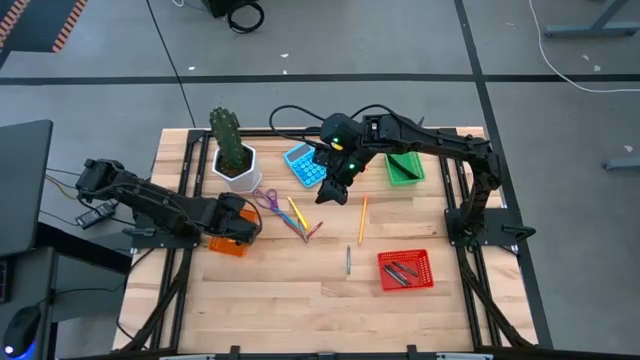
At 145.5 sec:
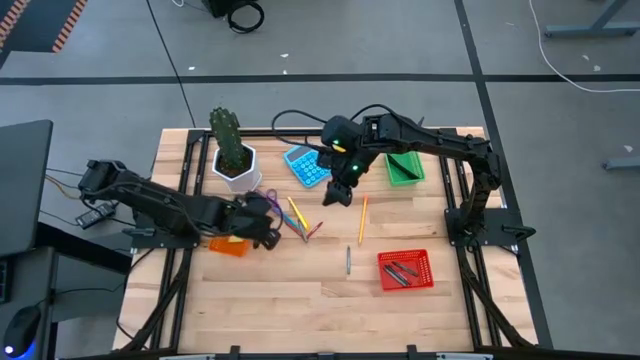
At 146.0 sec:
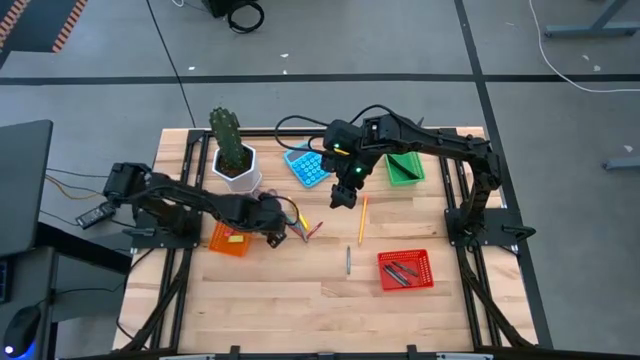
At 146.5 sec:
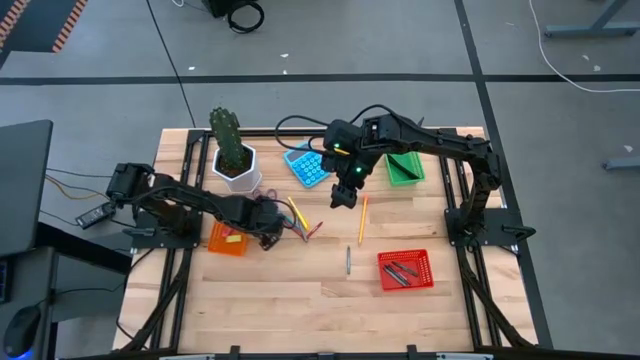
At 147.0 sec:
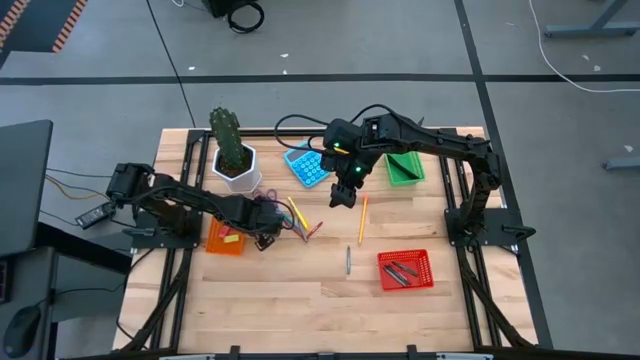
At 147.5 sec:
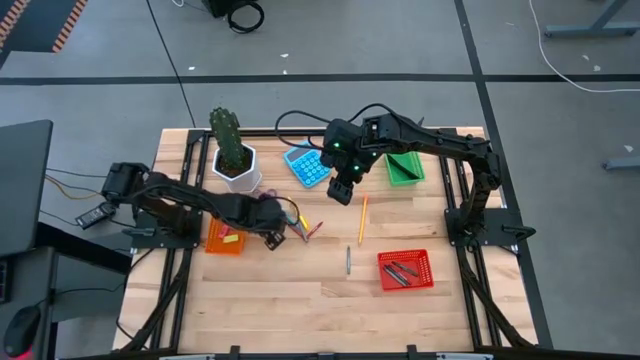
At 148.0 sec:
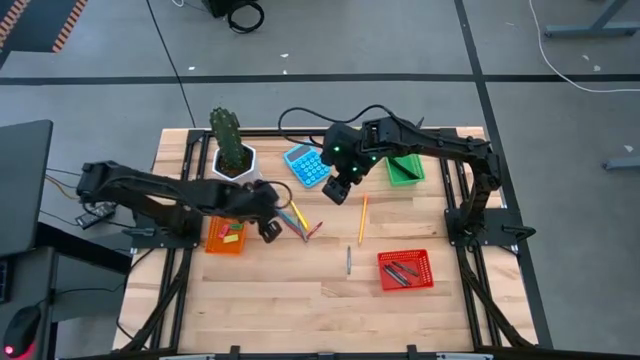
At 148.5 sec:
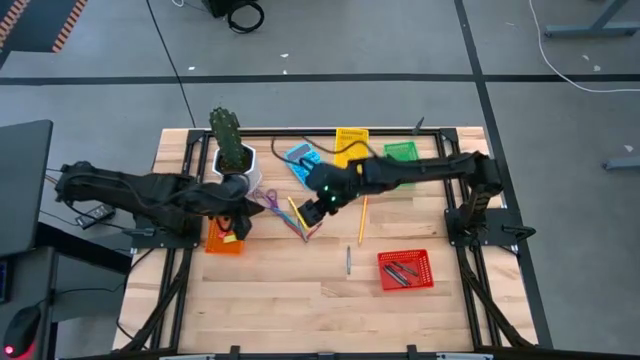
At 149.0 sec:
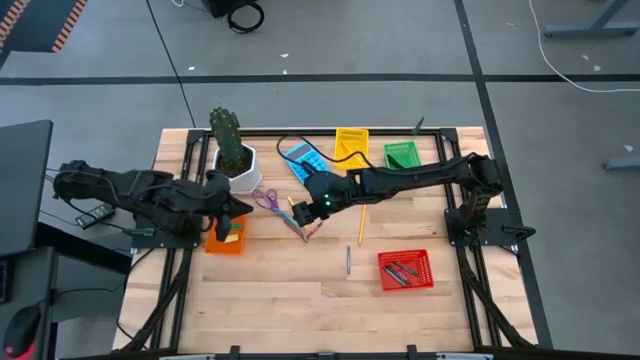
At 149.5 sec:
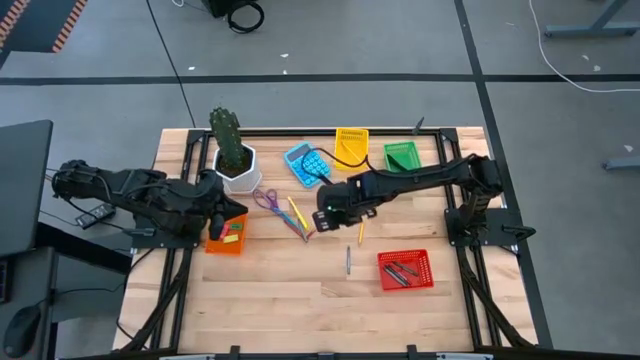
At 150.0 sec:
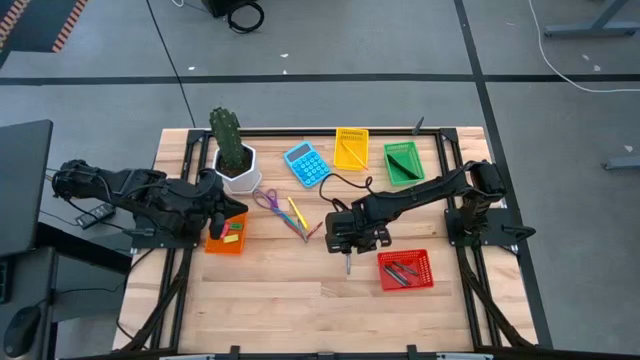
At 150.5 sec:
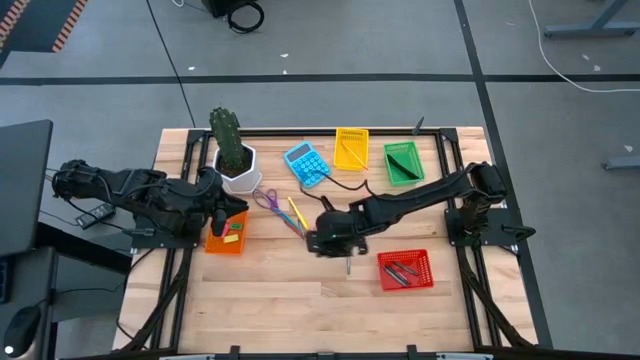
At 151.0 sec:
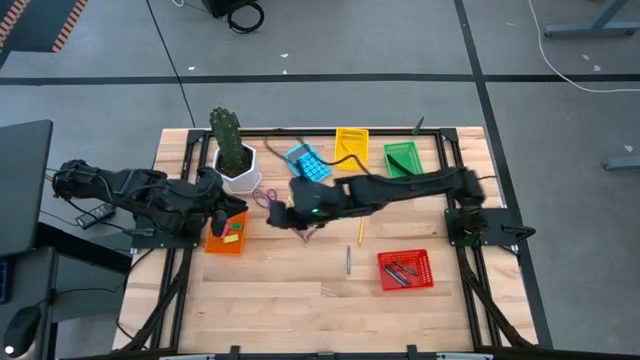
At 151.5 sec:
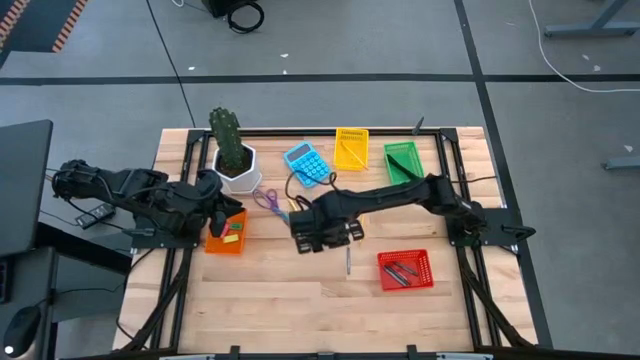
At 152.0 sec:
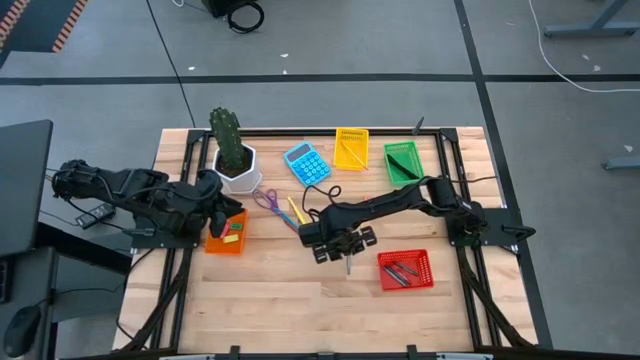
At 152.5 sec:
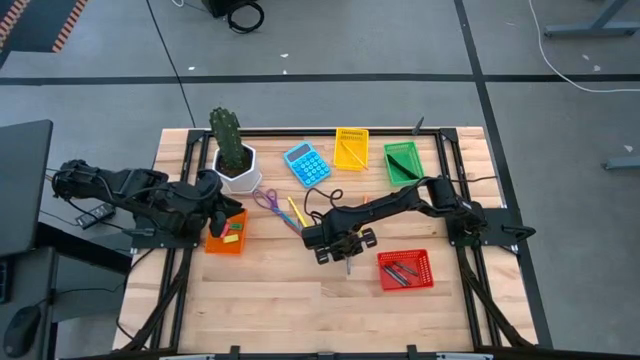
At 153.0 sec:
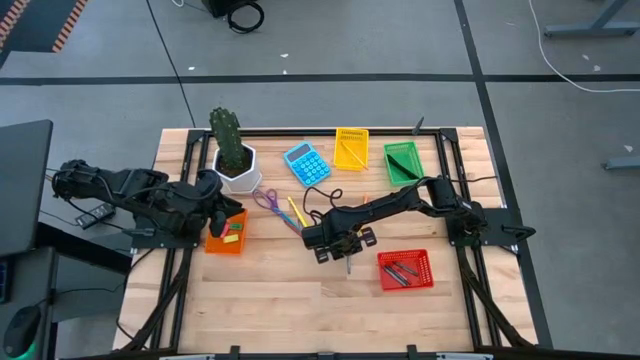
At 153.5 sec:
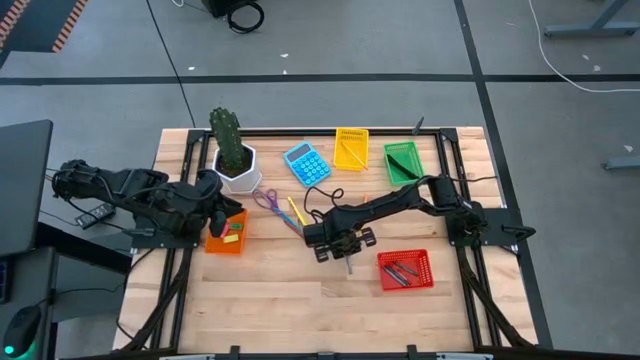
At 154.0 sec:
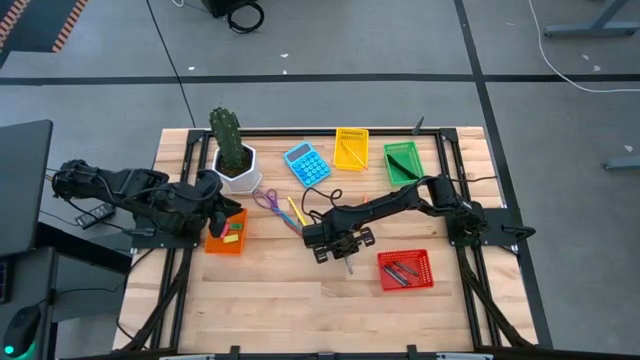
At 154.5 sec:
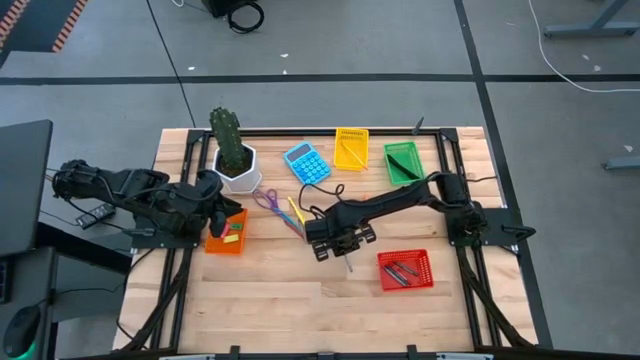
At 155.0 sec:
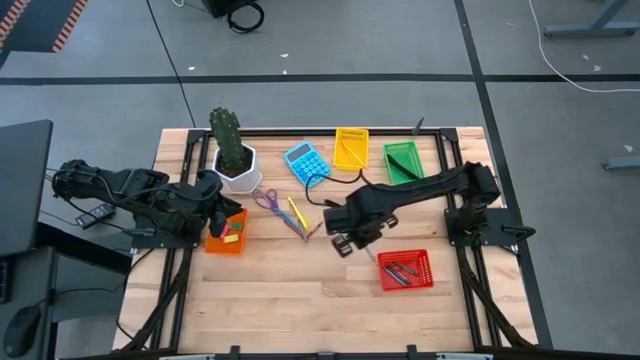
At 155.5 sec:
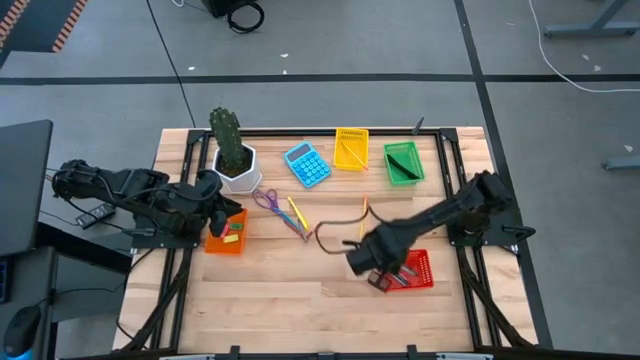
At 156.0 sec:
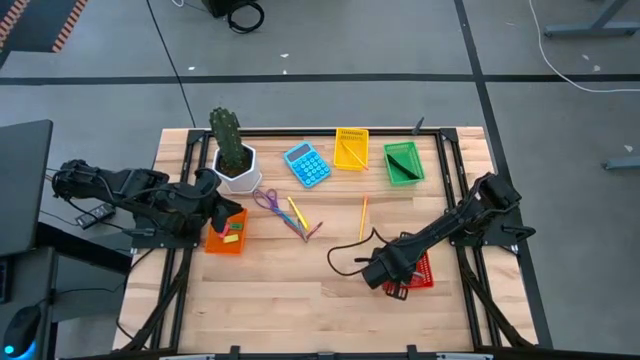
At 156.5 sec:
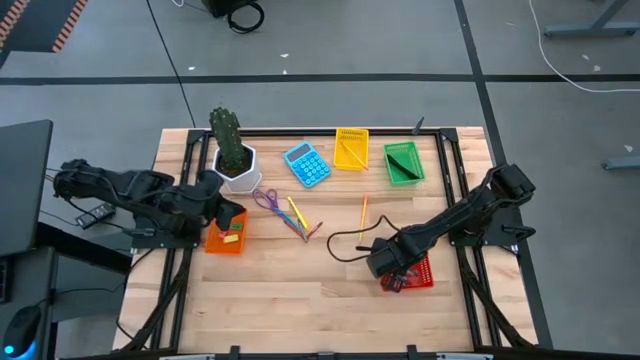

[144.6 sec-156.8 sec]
Task: Sort crayons/erasers/pens/pencils in bins
Put the bottom gray crayon into the red bin

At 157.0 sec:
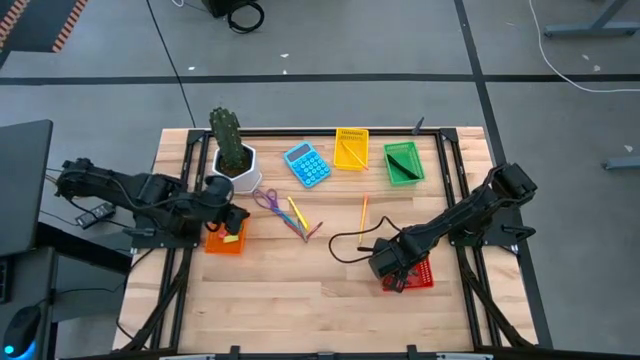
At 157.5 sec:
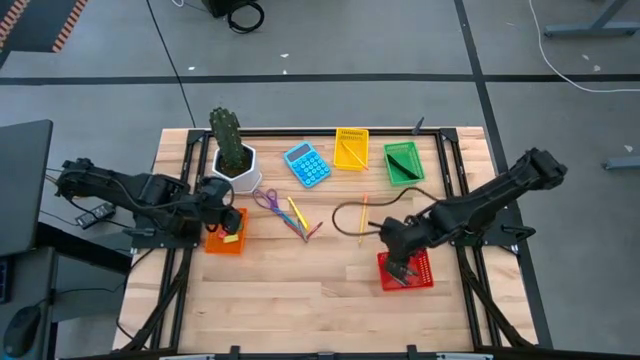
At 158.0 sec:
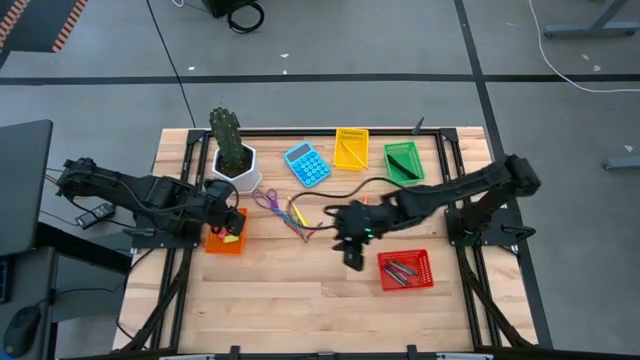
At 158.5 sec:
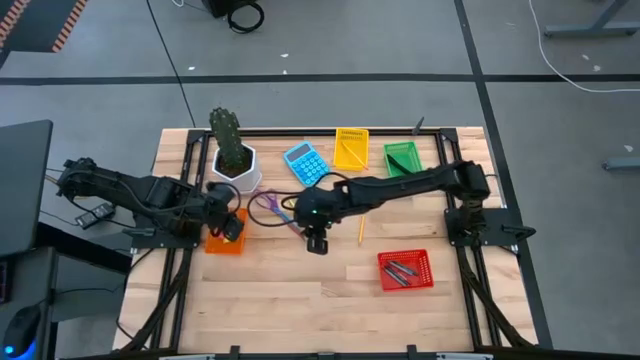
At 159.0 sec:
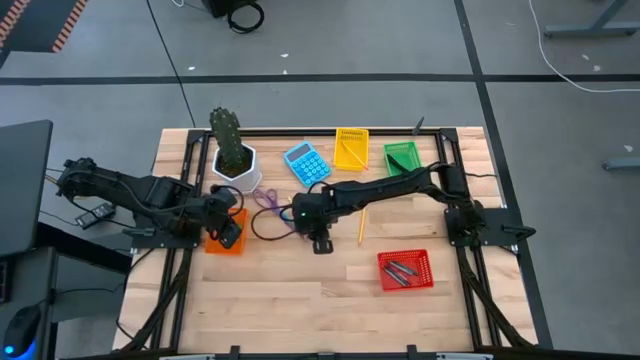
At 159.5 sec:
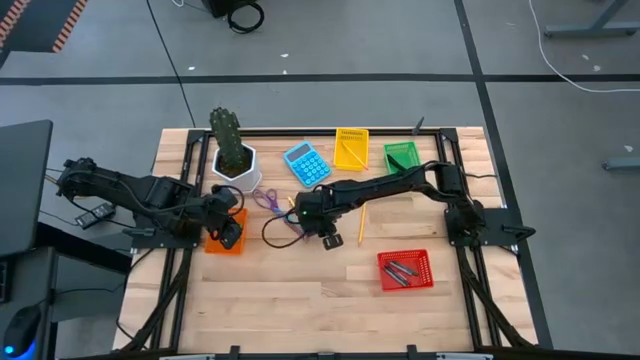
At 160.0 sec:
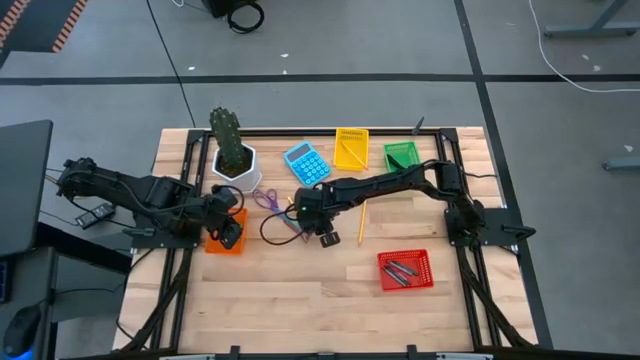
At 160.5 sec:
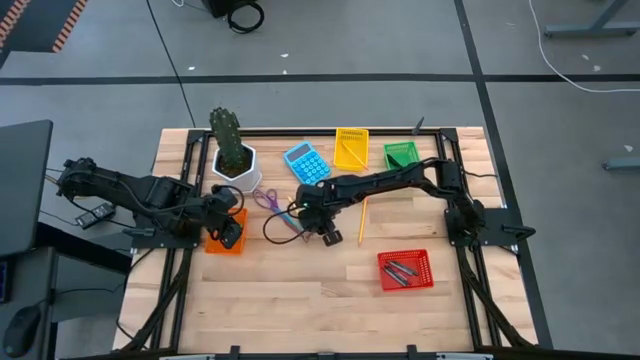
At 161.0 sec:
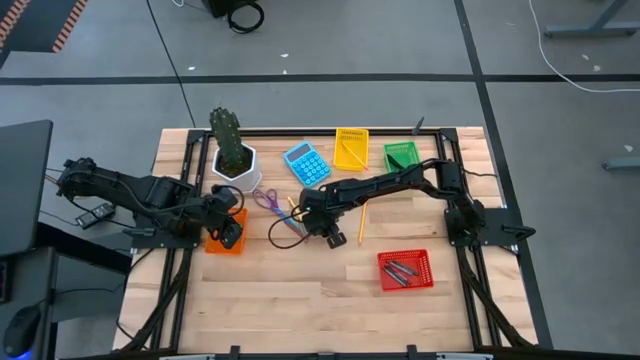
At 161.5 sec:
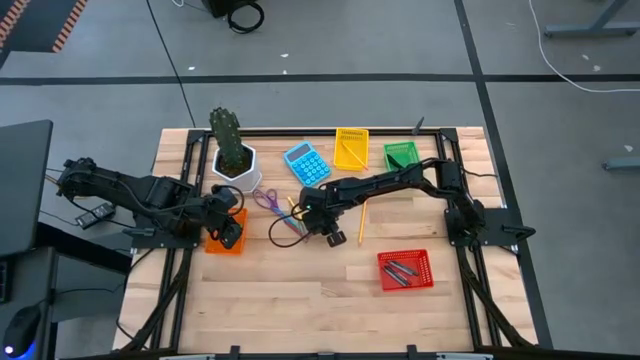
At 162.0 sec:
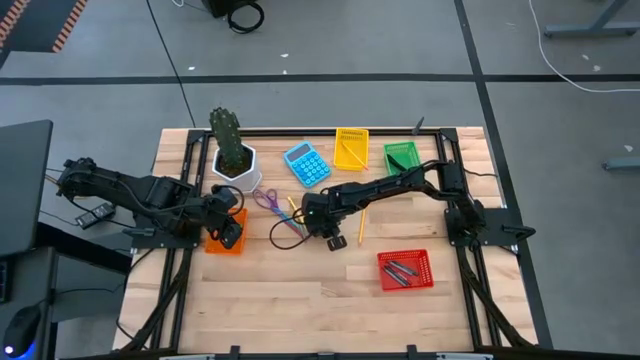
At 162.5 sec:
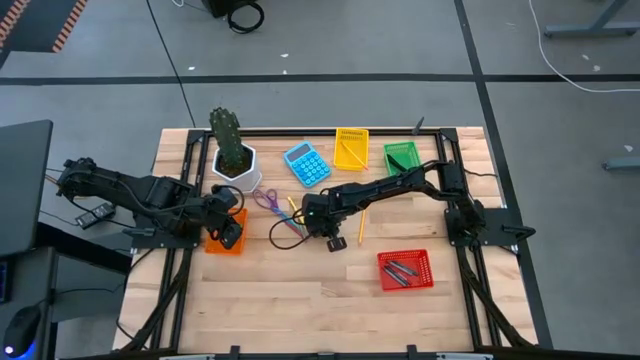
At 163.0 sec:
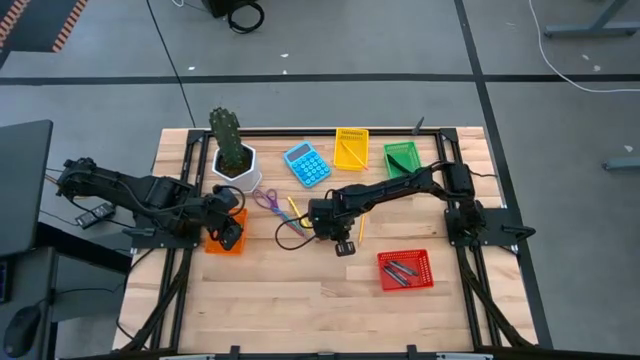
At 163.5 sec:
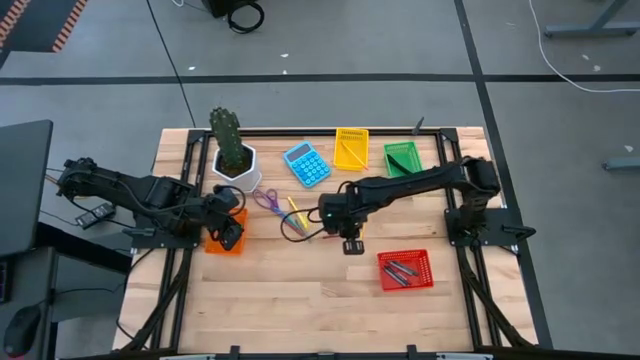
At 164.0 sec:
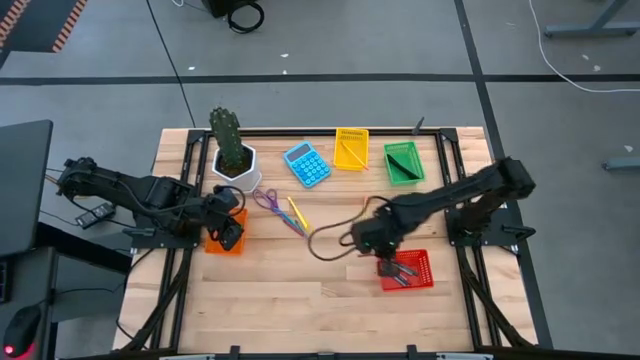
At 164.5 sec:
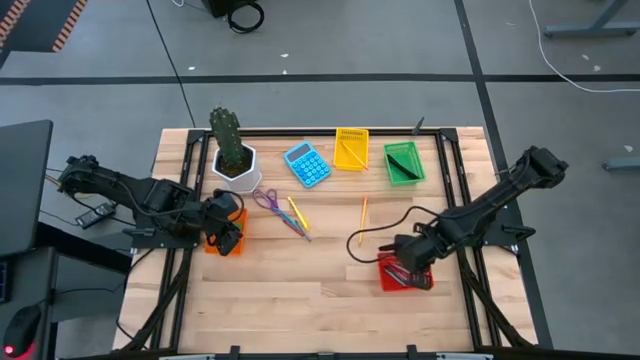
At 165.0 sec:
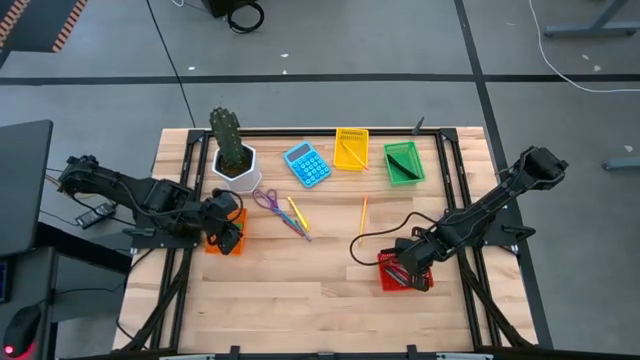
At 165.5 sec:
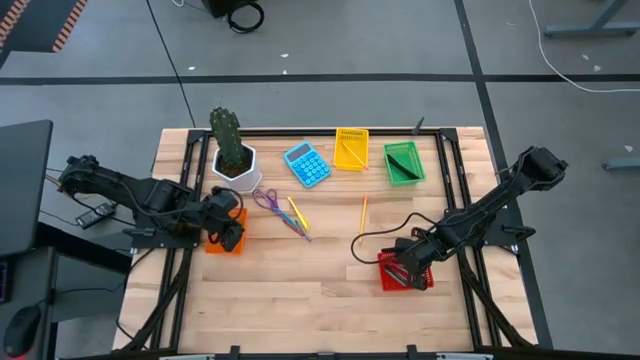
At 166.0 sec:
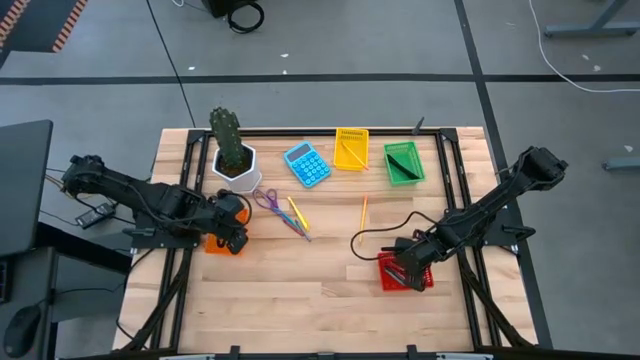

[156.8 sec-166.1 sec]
Put the right red crayon into the red bin
